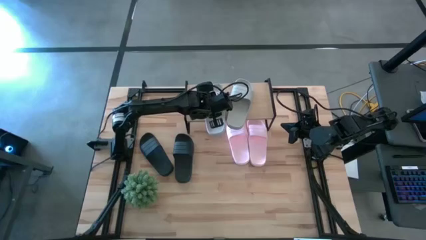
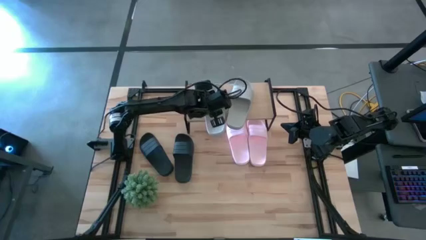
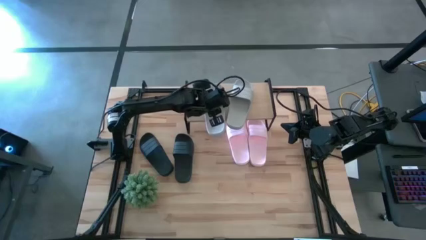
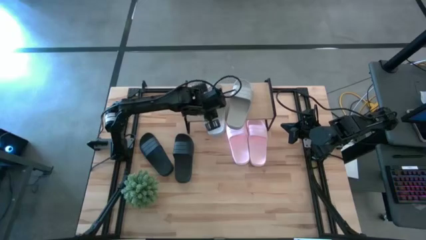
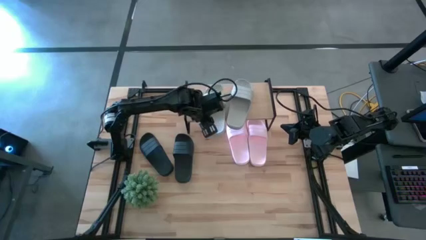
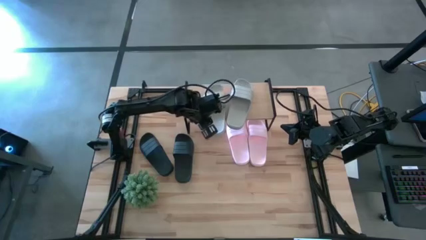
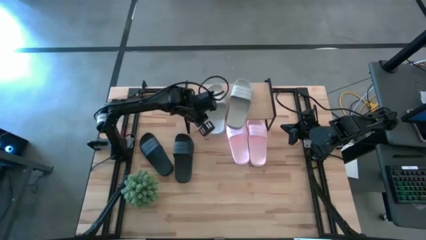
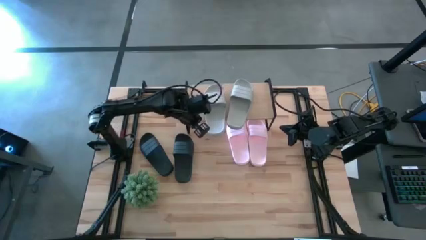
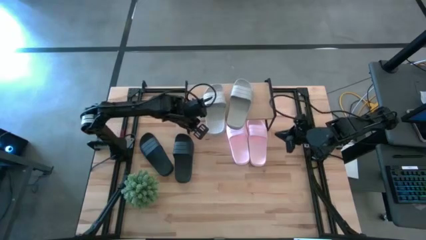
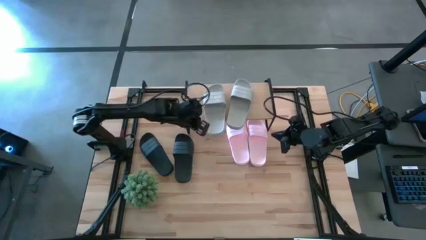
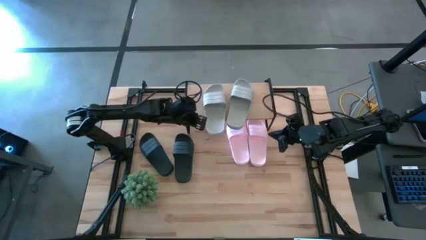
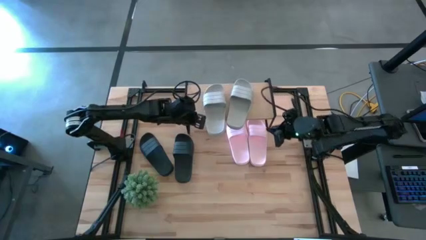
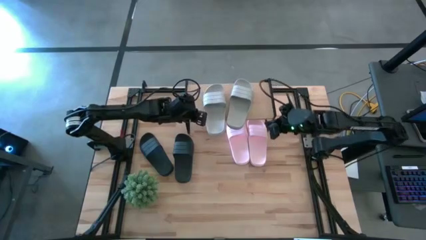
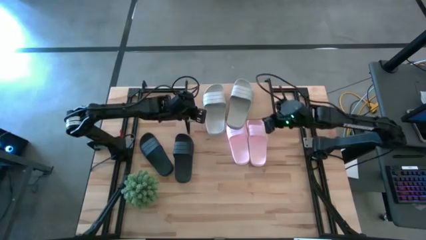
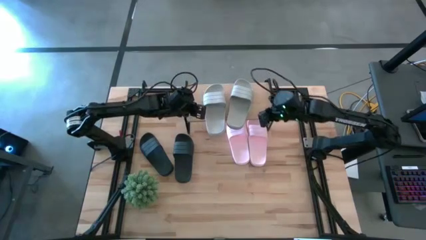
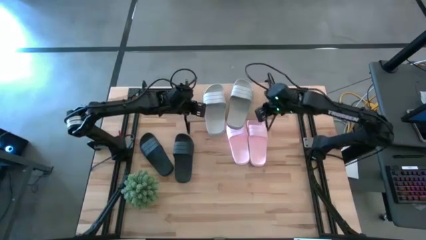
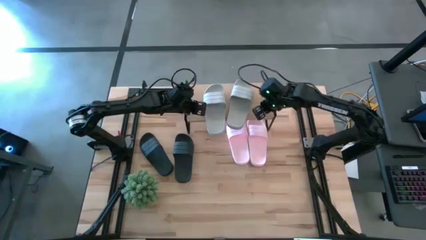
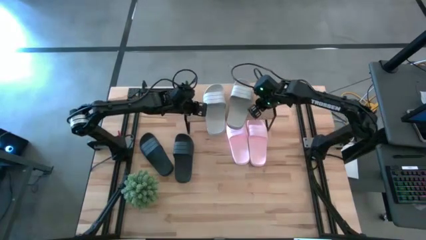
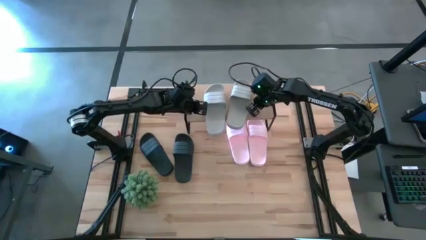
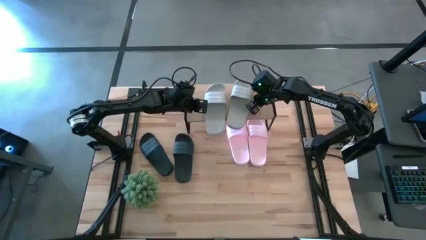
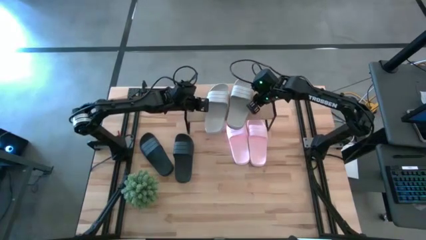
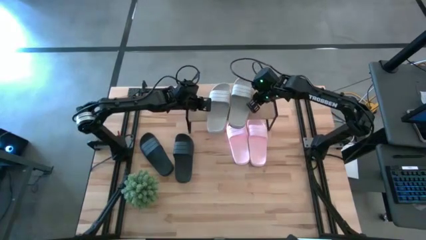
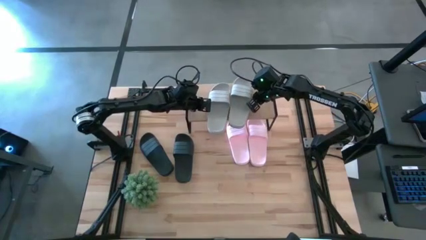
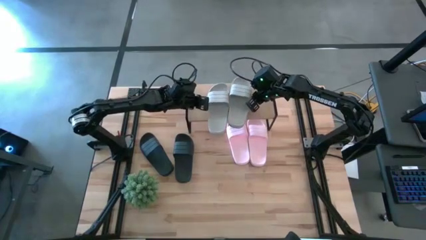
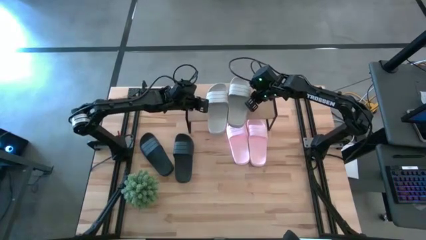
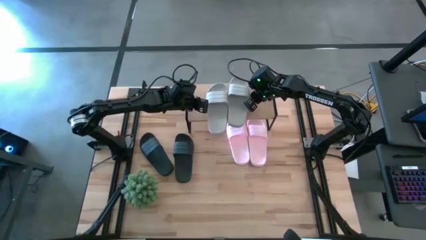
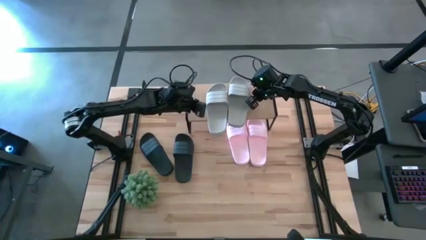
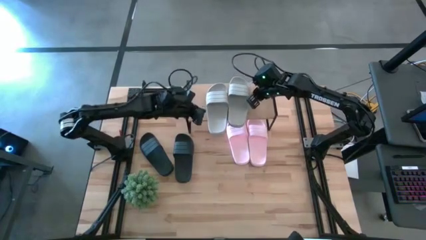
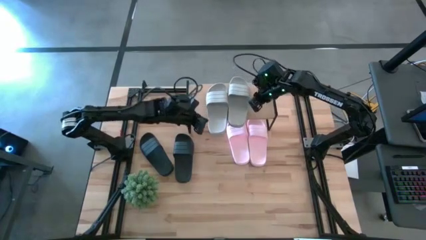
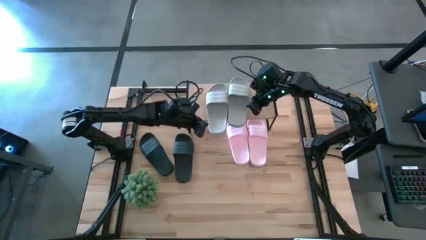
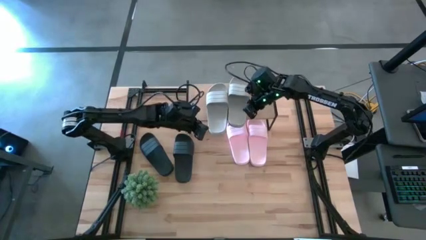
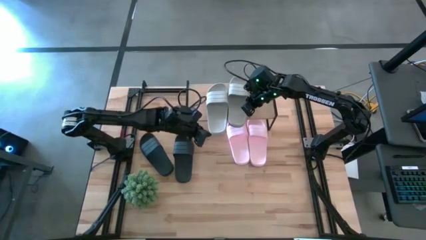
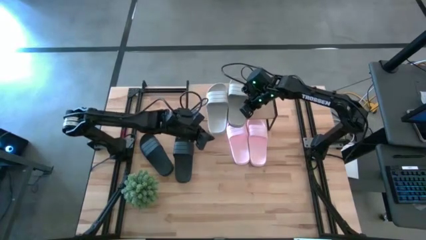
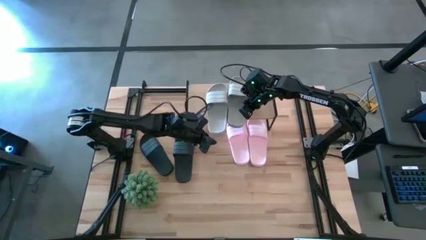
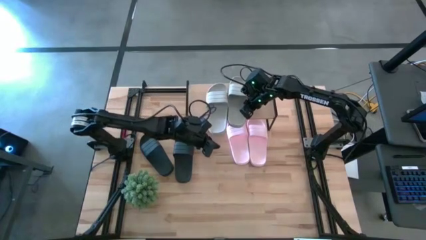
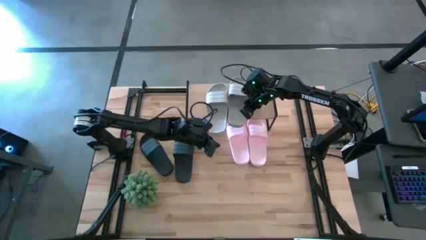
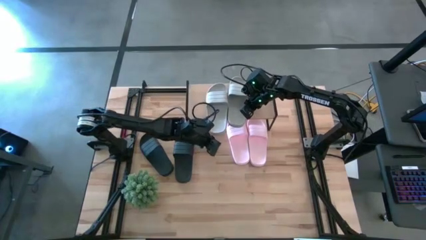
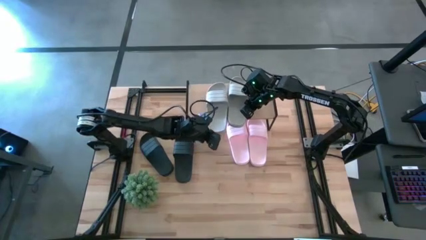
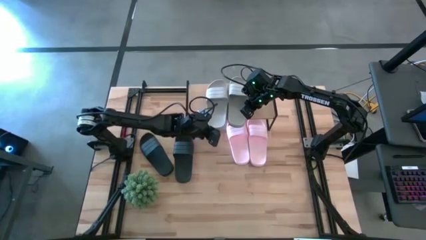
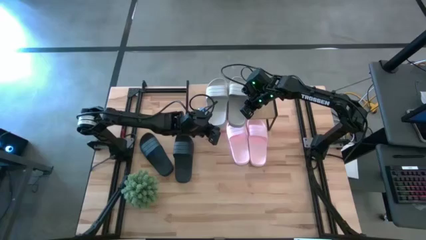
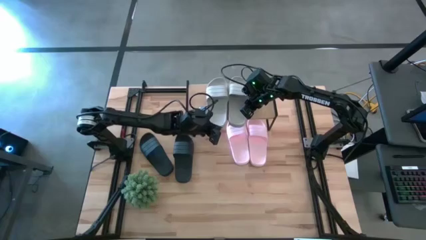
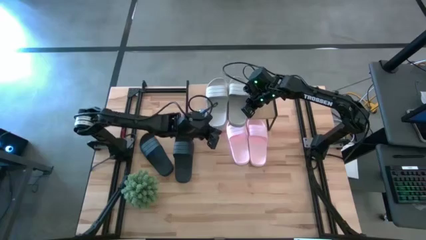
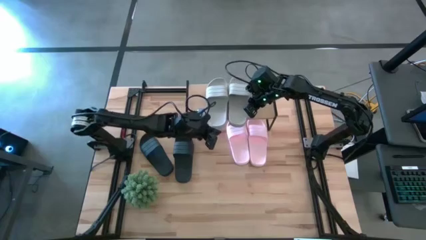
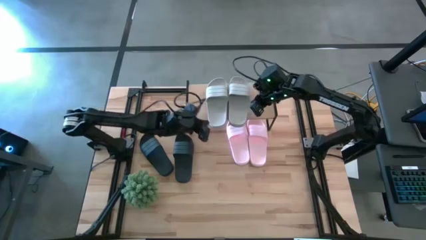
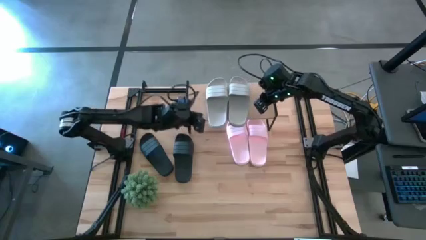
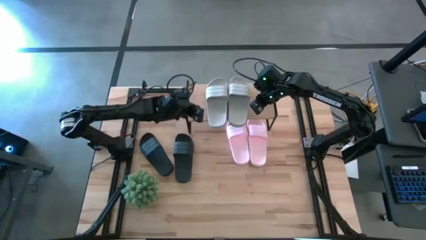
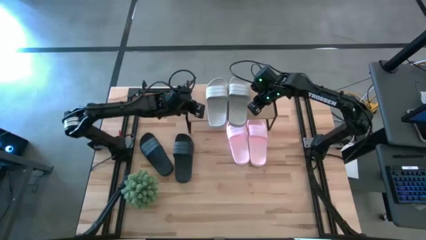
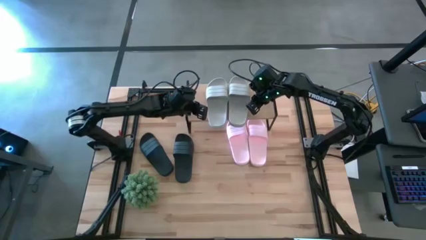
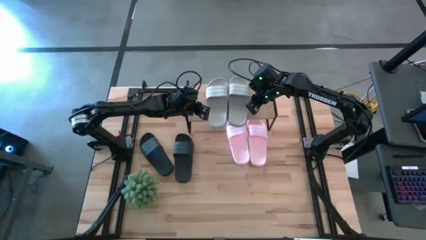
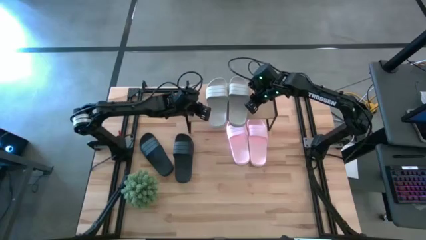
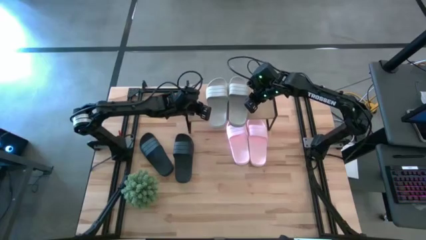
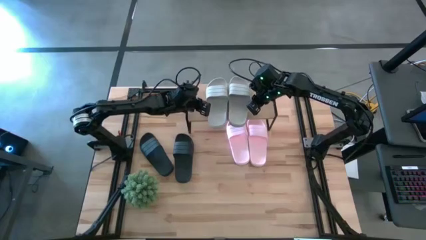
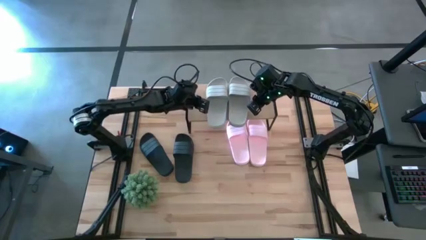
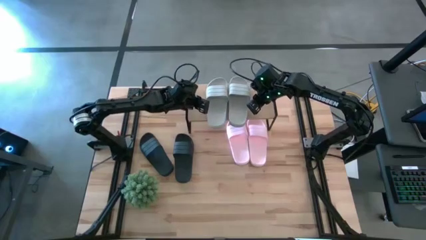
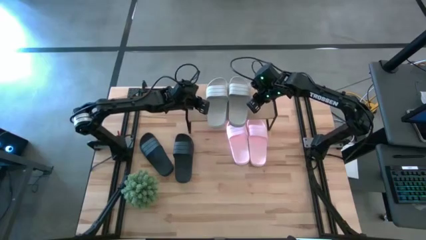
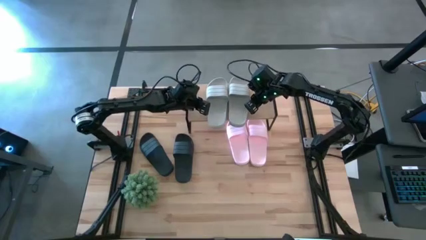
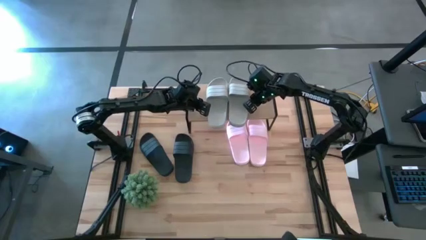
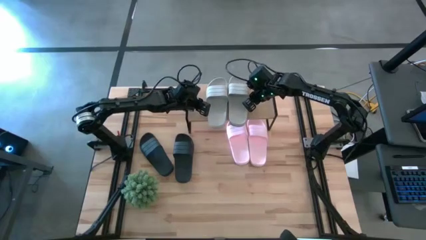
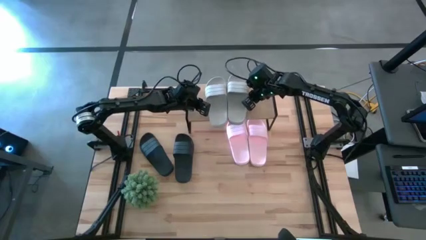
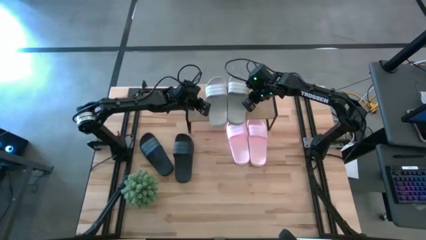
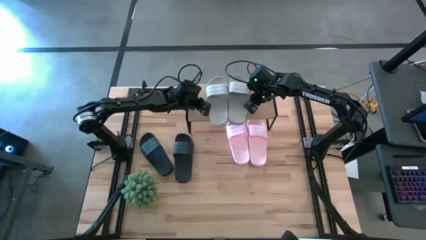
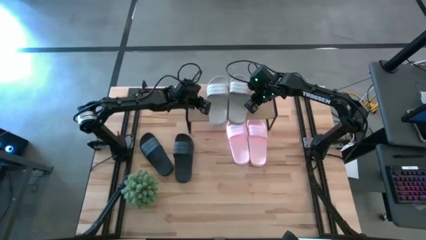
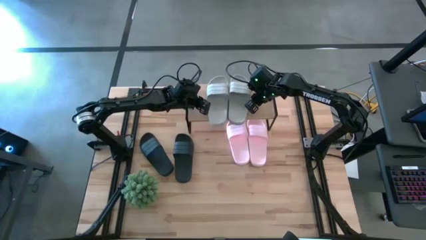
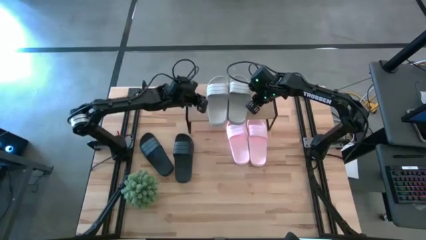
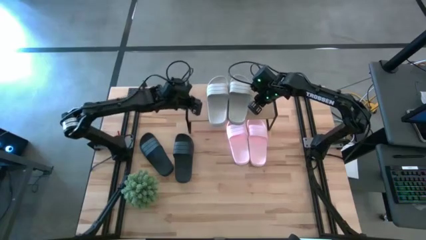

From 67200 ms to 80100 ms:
Task: Pick and place slides into the shelf
Adjust the gray slides on the shelf

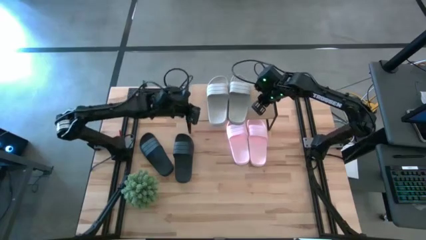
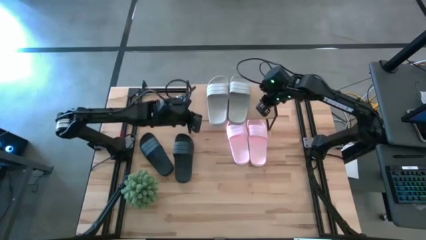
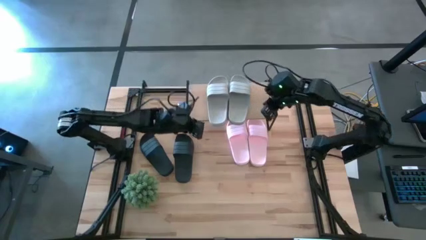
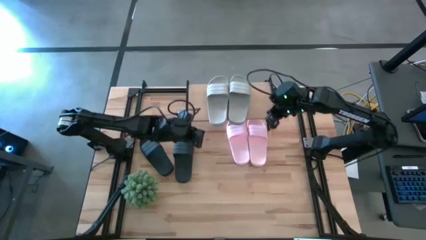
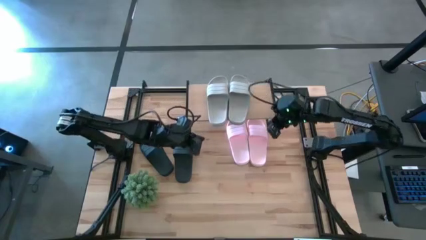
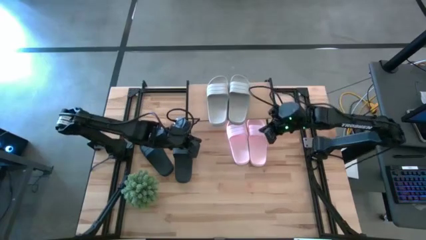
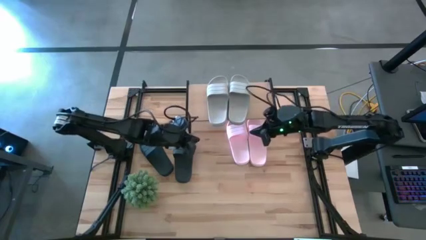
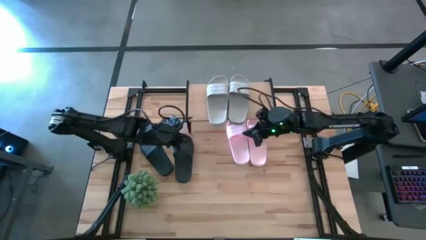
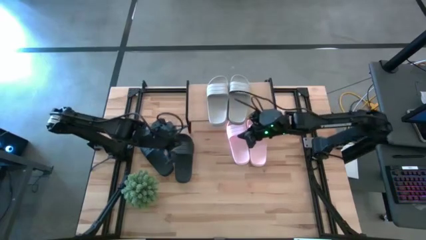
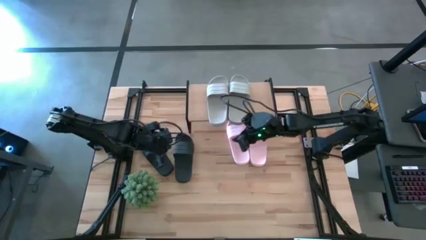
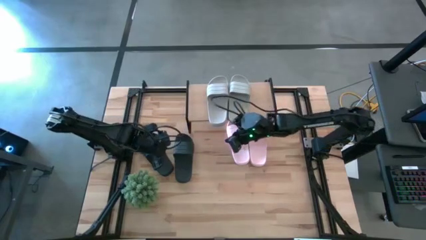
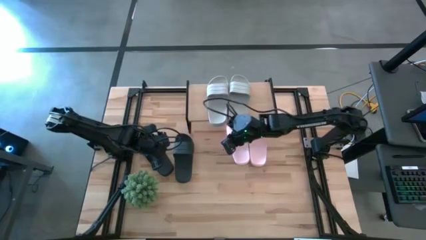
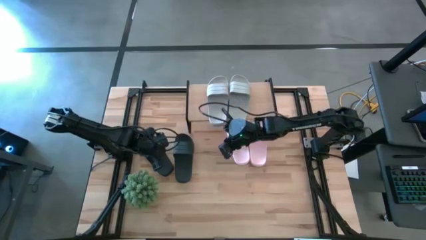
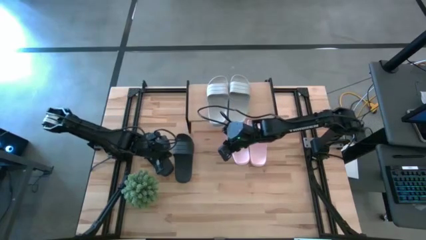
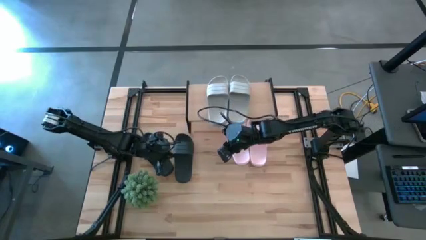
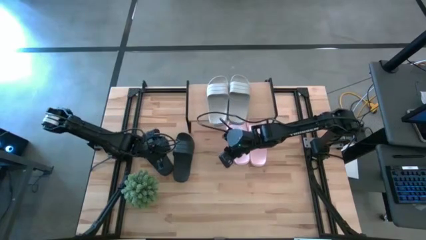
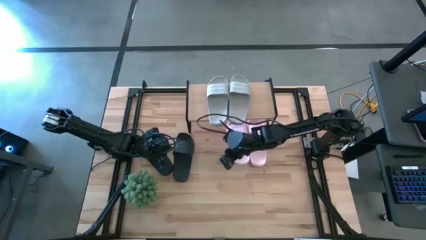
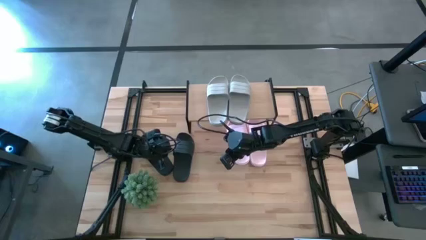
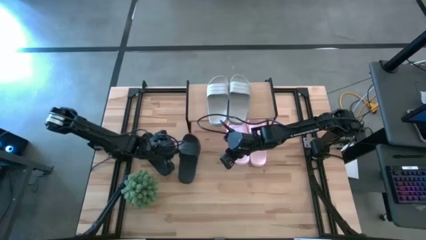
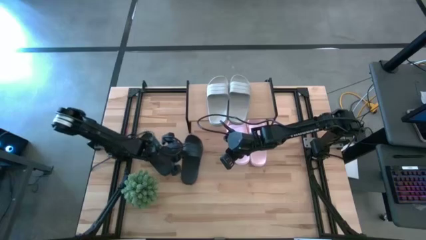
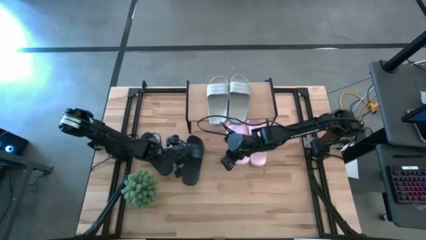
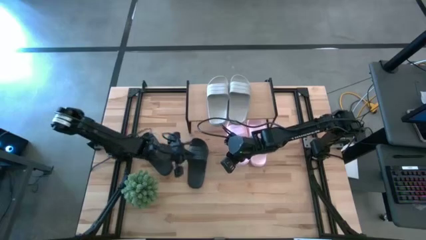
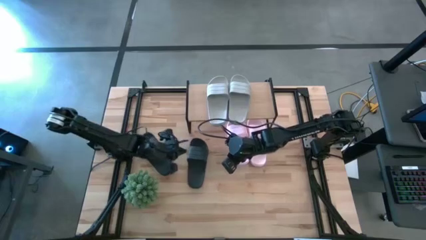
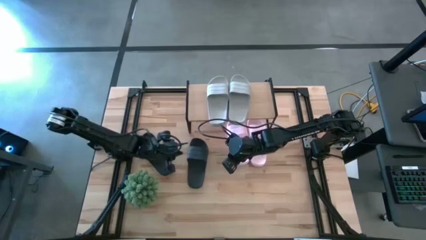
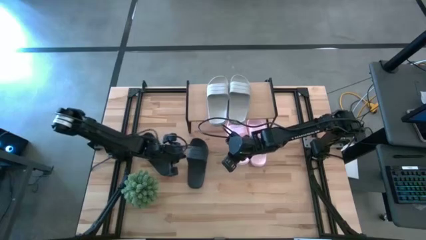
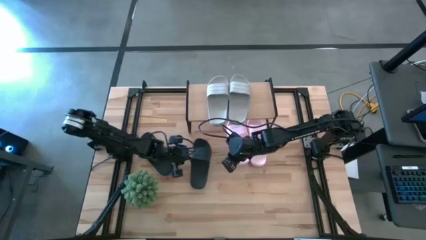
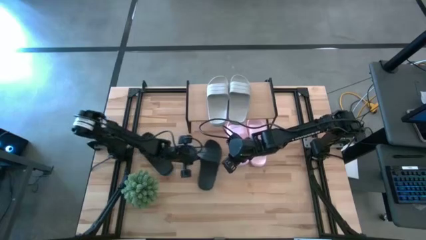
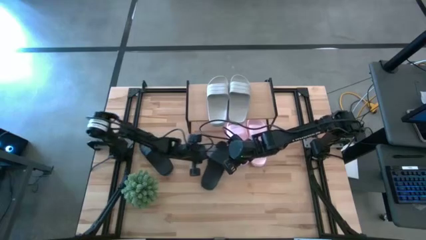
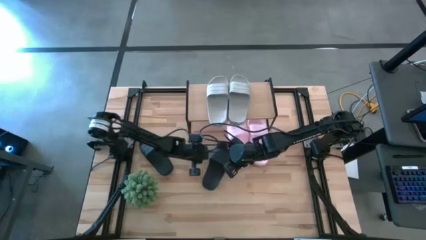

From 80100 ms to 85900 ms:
Put the right black slide under the shelf
